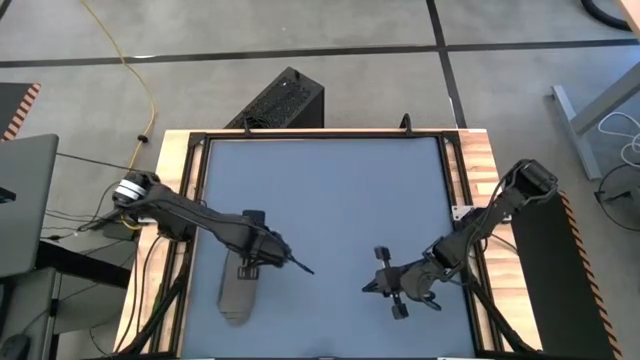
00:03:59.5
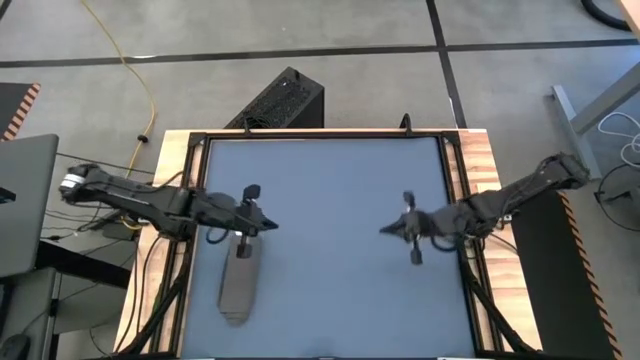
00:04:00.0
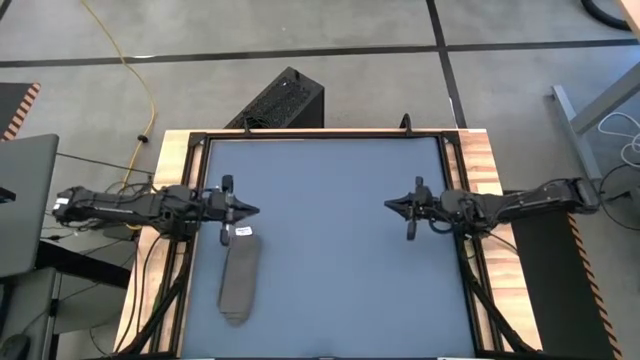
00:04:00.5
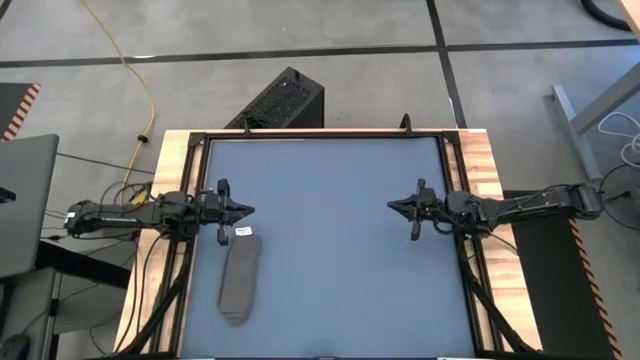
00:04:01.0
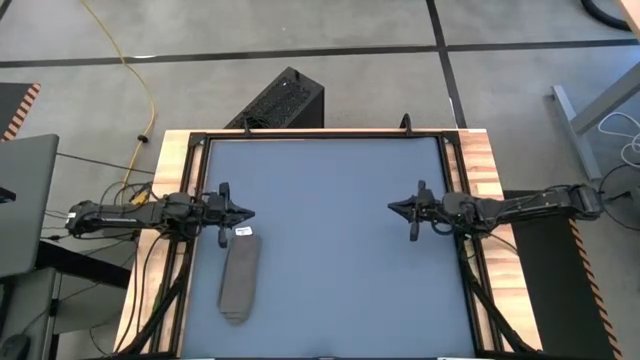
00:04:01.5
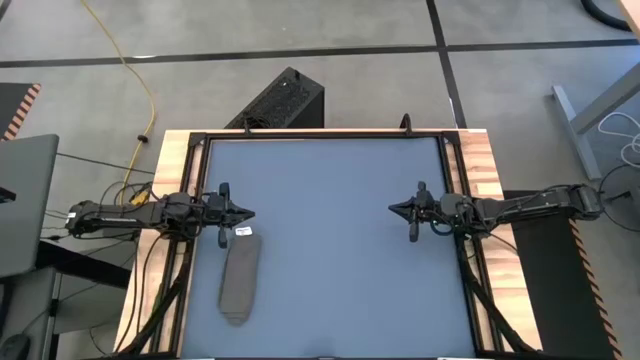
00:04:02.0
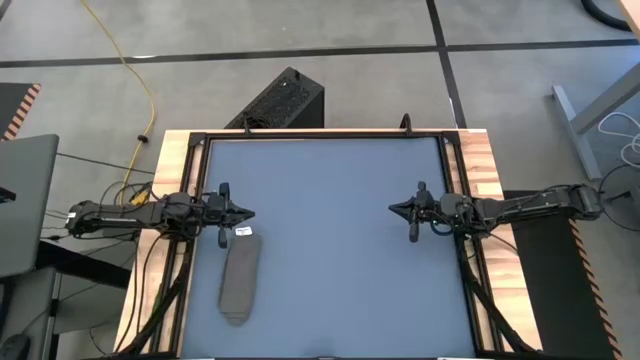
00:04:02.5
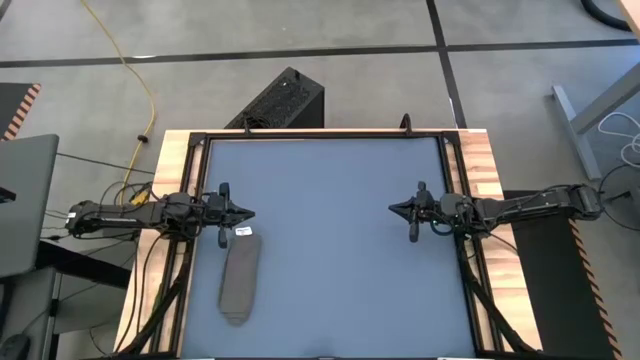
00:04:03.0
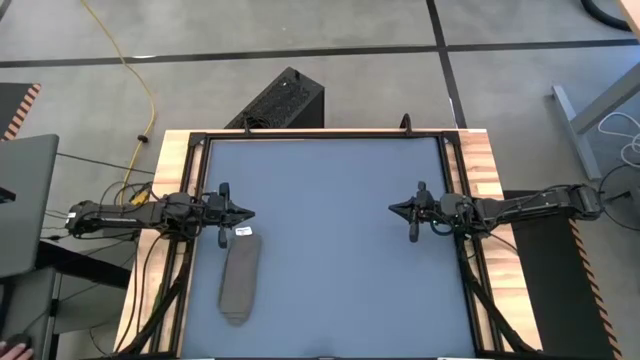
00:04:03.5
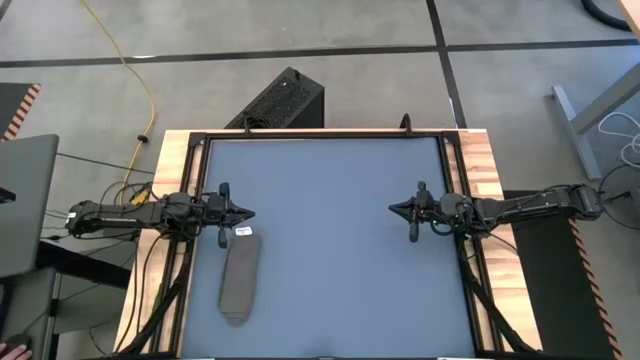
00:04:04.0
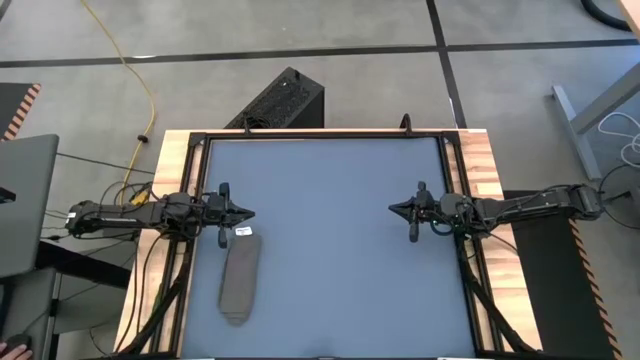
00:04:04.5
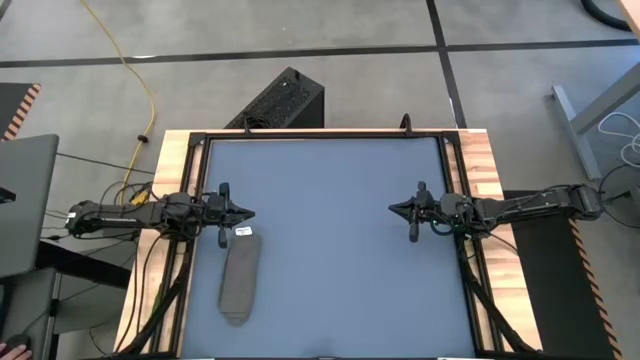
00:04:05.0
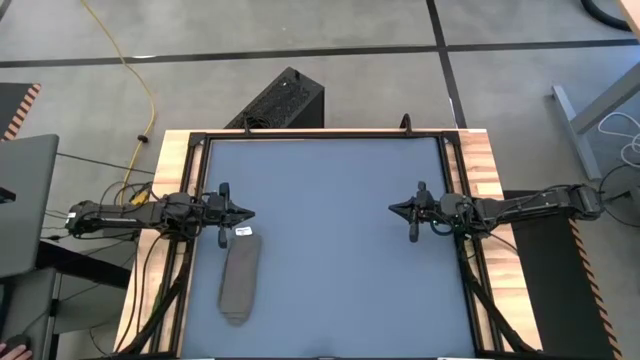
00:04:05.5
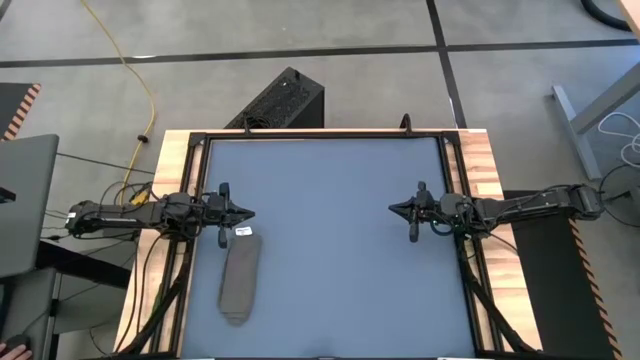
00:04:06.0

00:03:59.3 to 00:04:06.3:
Task: Roll towel
Return to Home Position

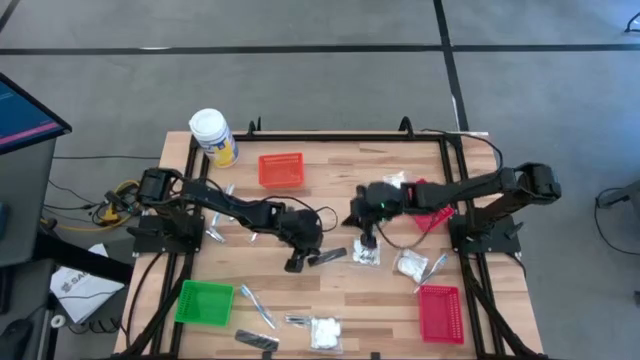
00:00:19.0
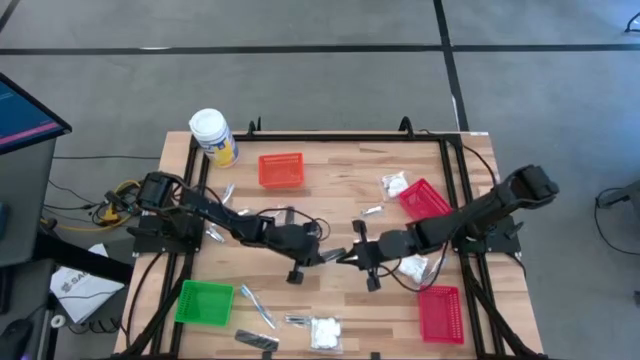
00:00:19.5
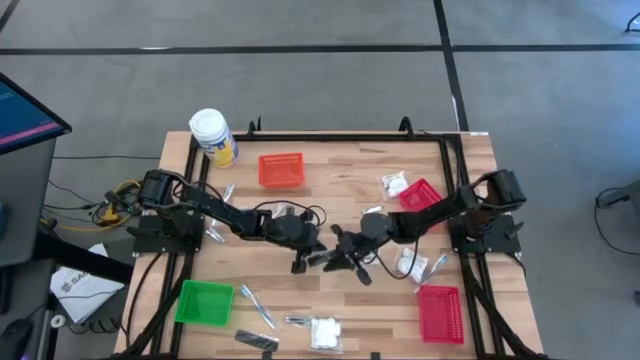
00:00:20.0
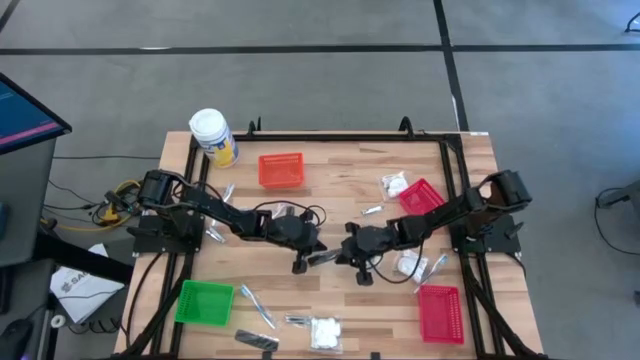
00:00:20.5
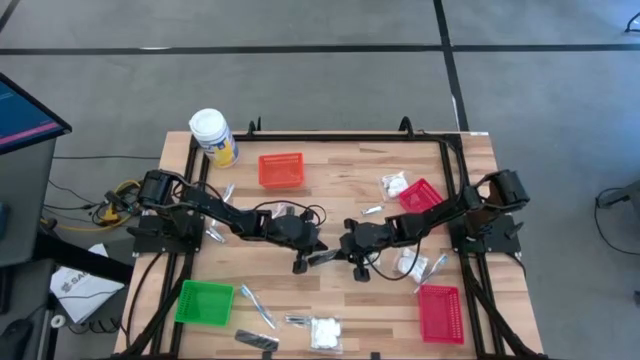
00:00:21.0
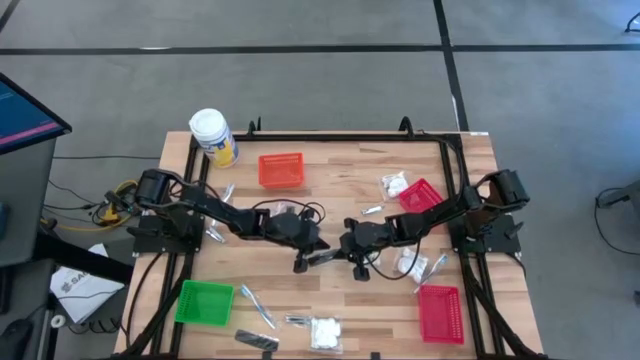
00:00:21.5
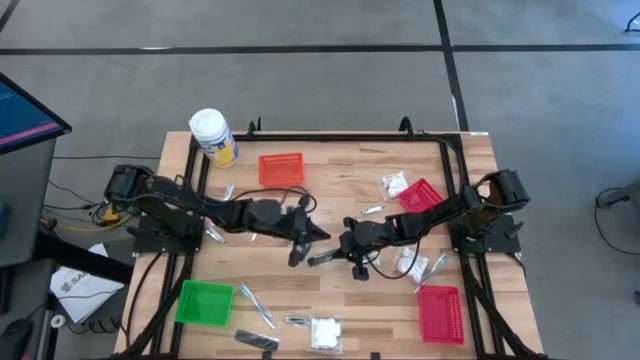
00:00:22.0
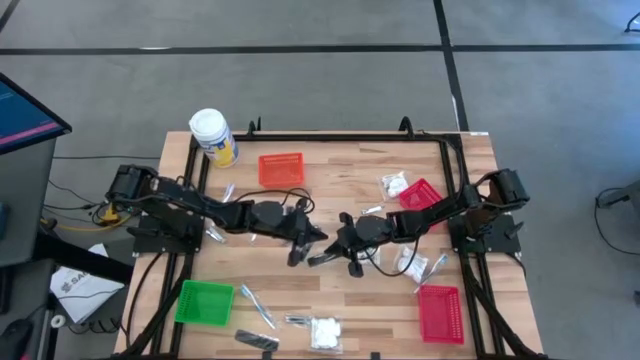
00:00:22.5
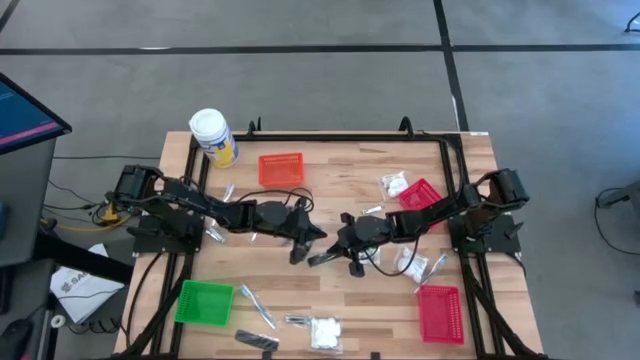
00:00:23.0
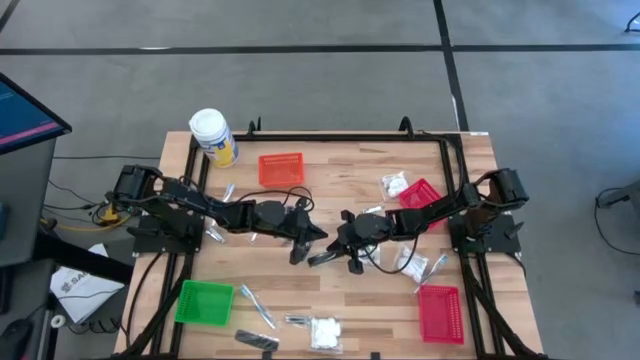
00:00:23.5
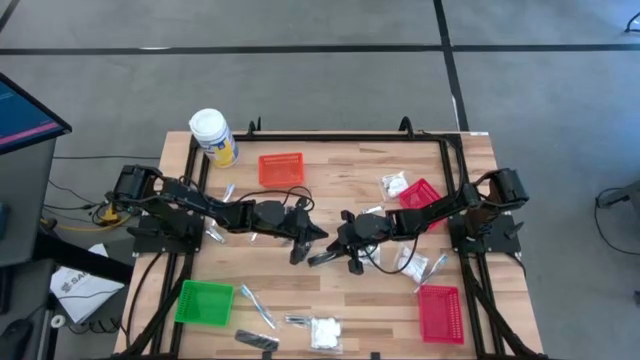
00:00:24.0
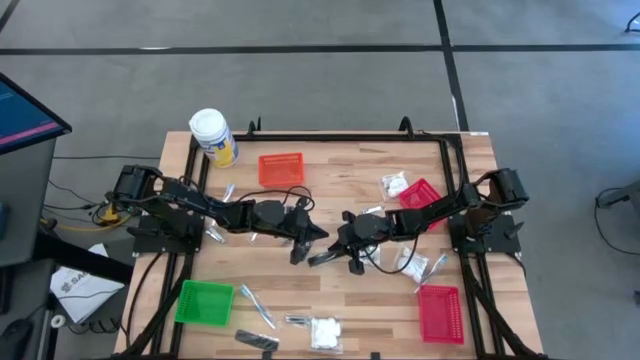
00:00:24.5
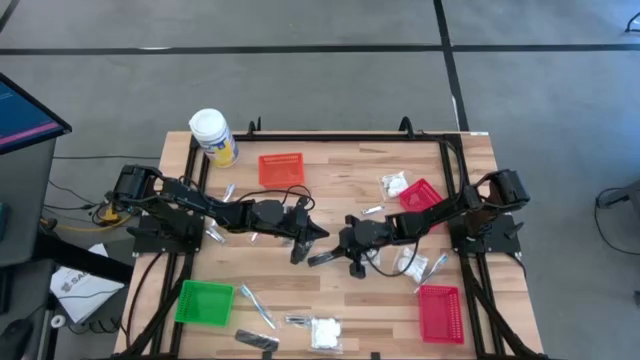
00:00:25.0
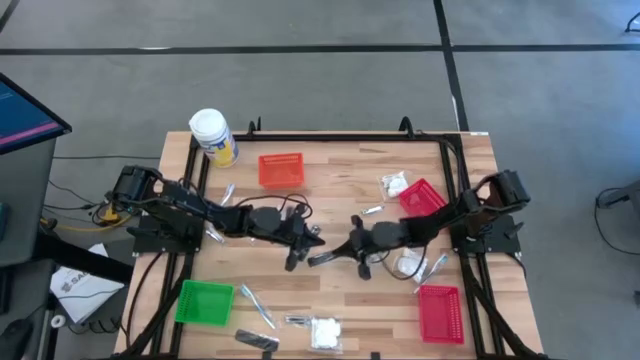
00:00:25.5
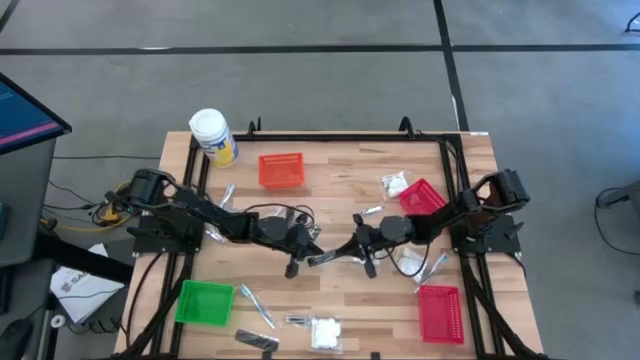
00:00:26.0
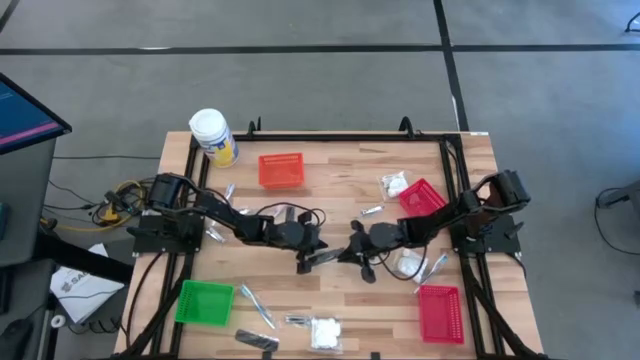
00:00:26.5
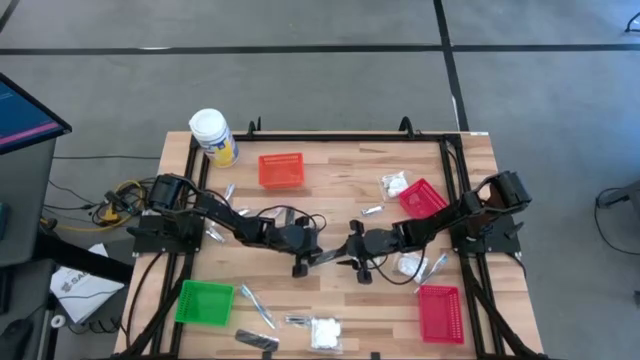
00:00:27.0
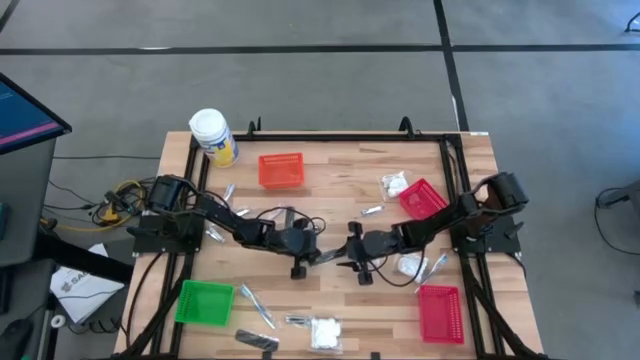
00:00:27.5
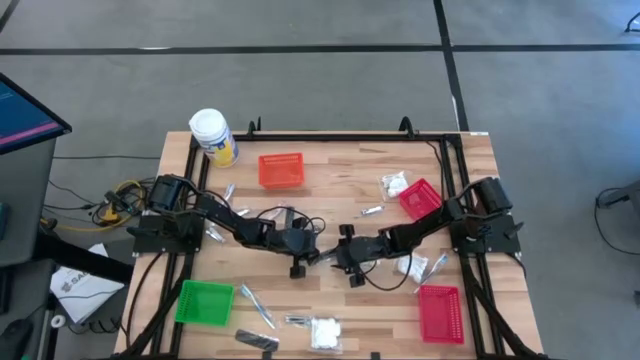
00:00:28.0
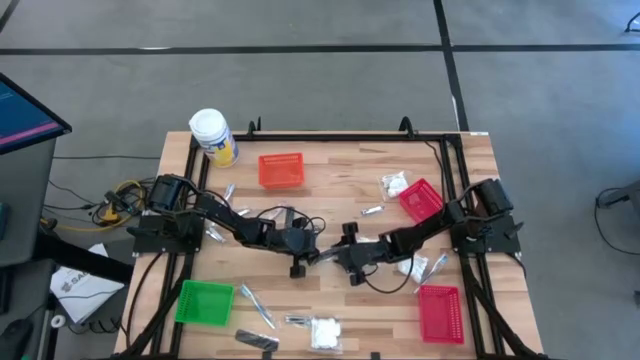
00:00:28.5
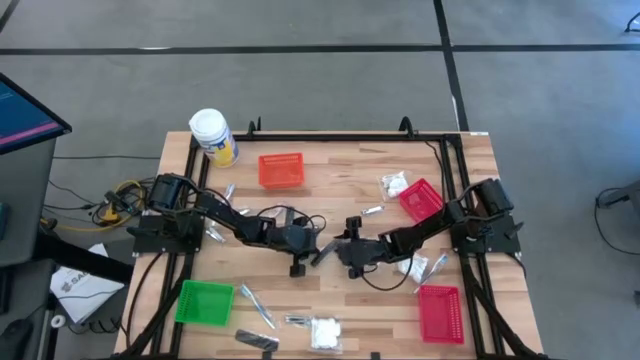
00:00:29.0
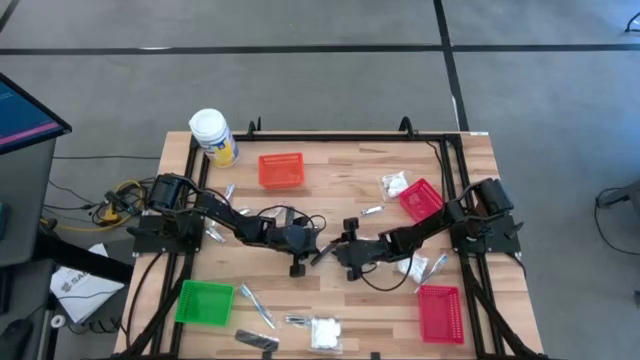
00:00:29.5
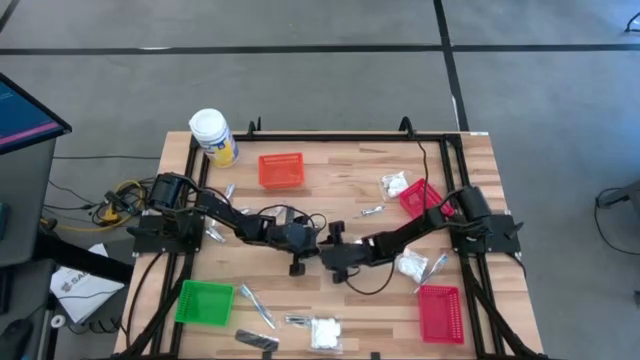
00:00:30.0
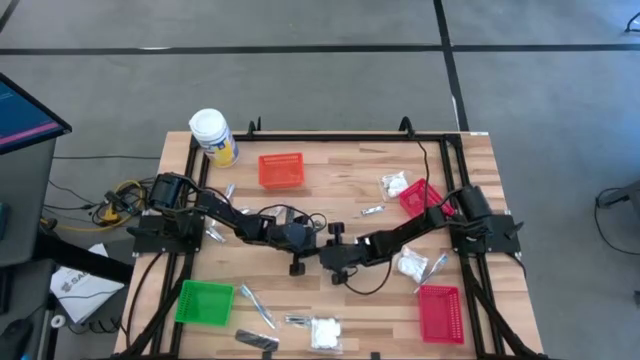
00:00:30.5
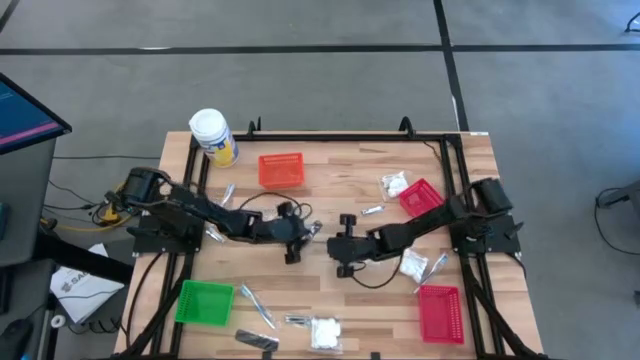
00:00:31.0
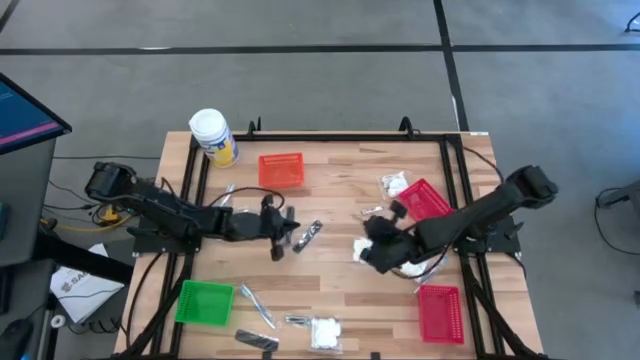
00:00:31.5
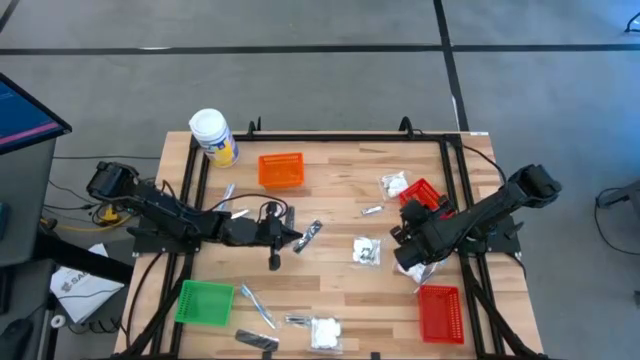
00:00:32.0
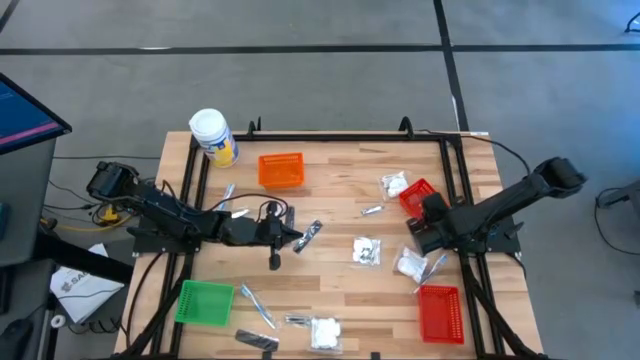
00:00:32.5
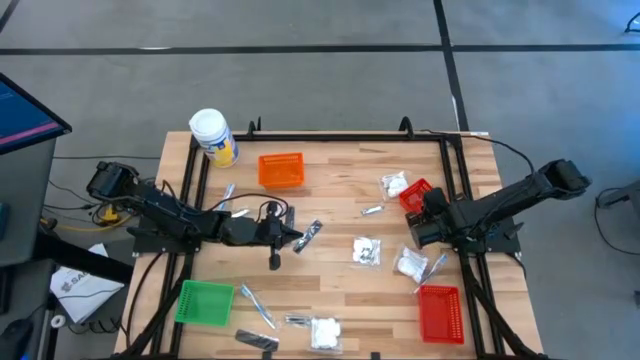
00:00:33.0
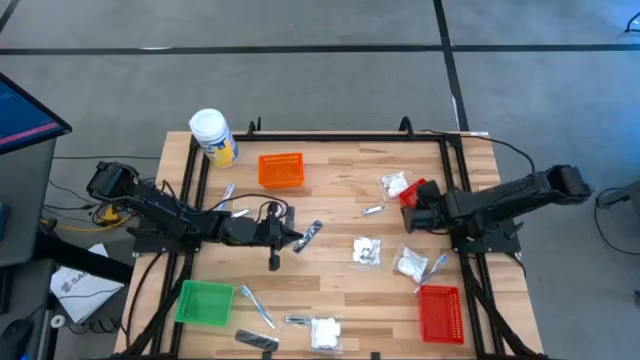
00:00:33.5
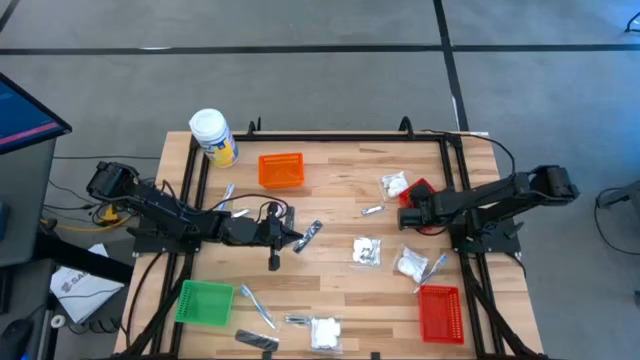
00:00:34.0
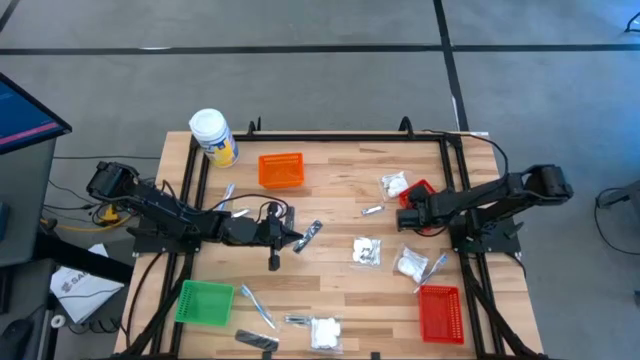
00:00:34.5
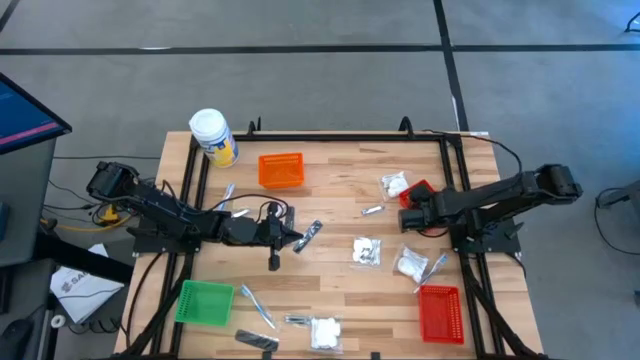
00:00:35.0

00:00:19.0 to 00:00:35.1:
Task: Pick & Place Travel size toiletries
Put the black comb into the top red basket
